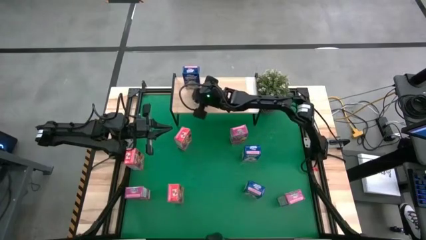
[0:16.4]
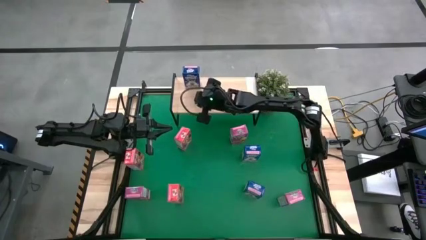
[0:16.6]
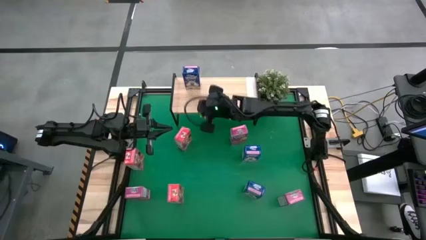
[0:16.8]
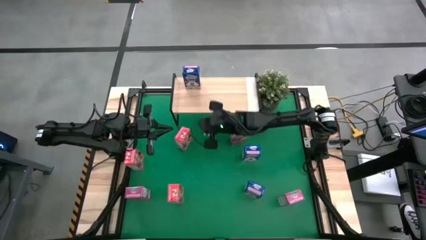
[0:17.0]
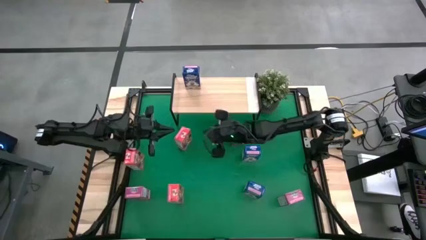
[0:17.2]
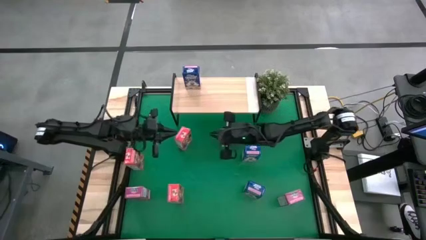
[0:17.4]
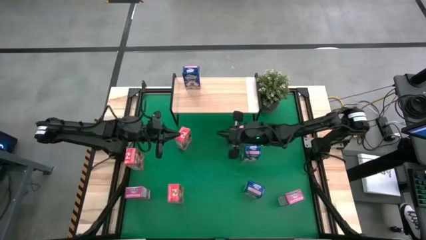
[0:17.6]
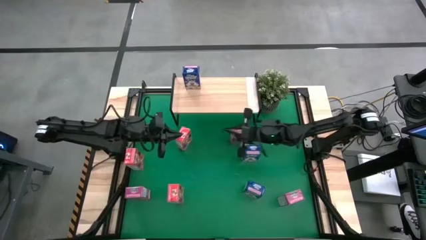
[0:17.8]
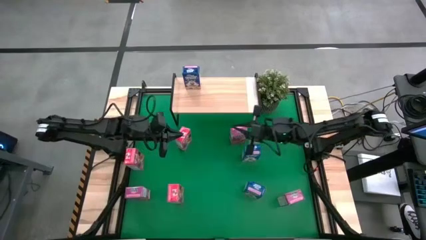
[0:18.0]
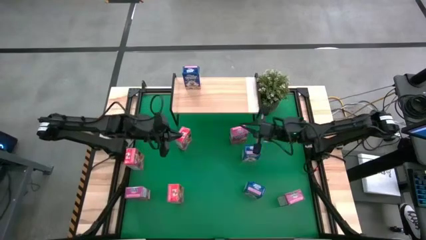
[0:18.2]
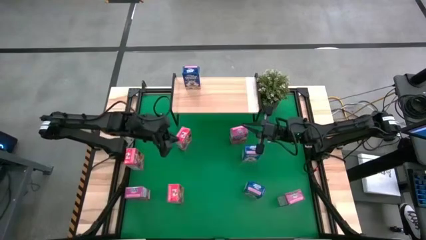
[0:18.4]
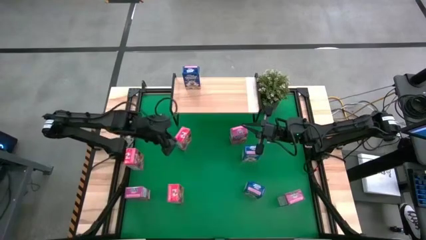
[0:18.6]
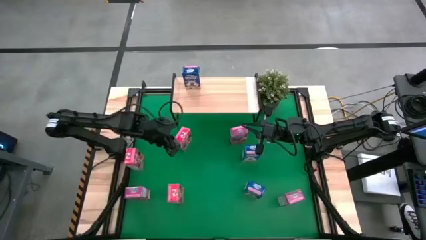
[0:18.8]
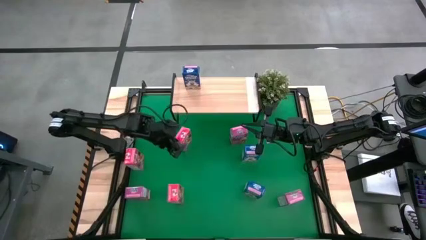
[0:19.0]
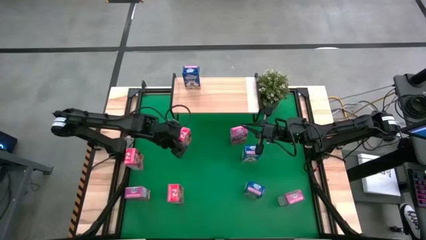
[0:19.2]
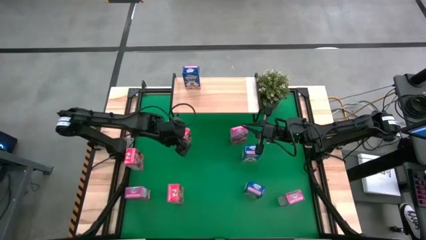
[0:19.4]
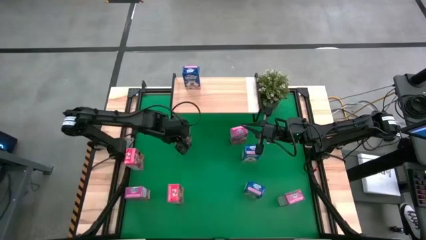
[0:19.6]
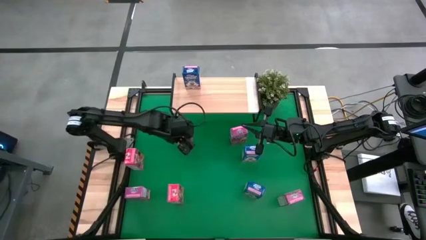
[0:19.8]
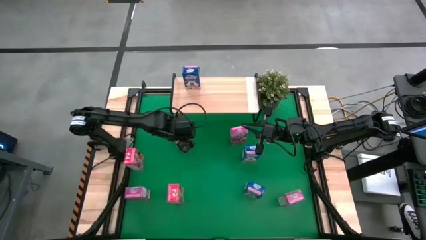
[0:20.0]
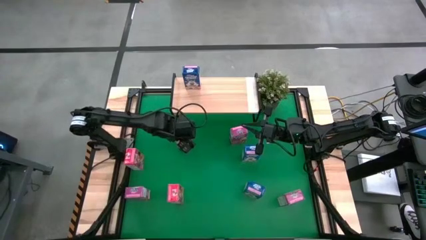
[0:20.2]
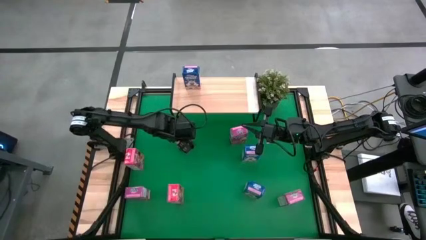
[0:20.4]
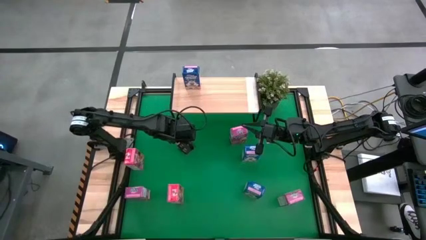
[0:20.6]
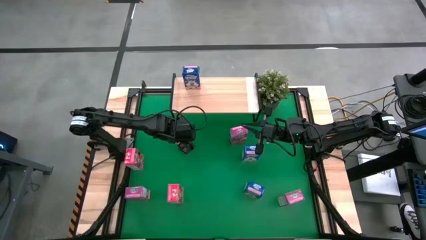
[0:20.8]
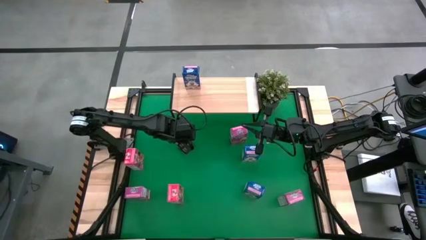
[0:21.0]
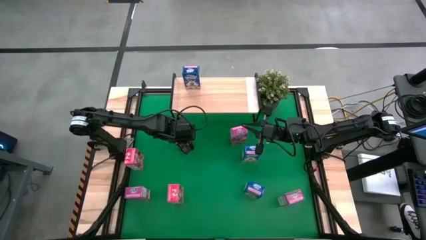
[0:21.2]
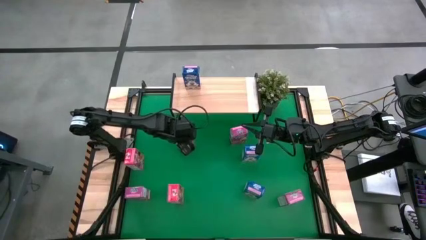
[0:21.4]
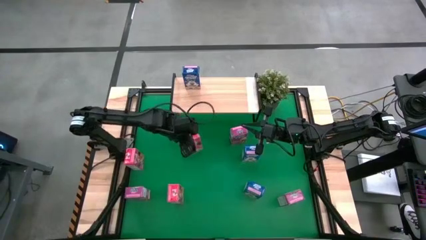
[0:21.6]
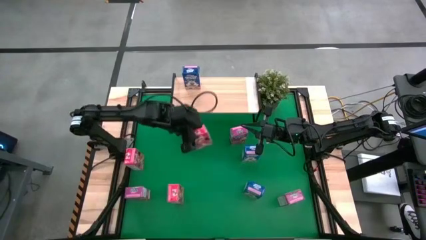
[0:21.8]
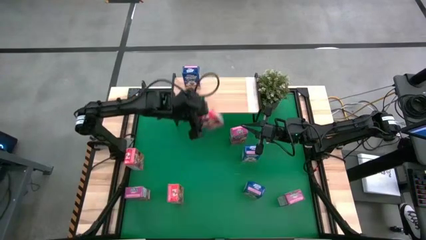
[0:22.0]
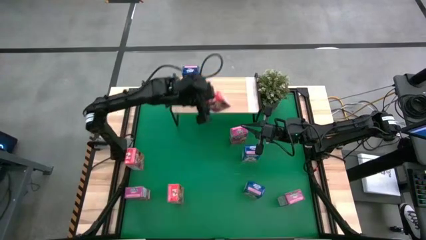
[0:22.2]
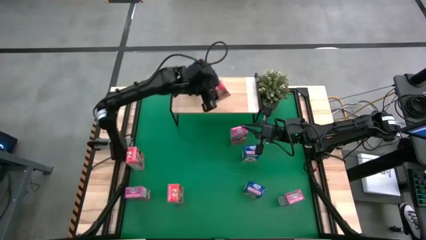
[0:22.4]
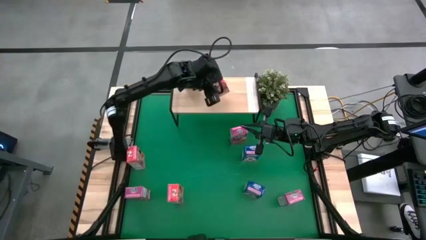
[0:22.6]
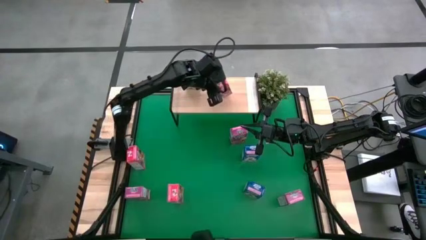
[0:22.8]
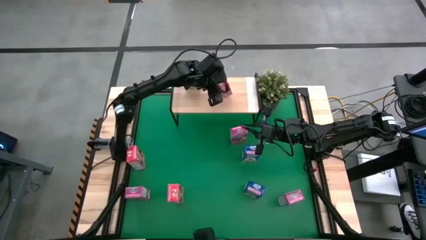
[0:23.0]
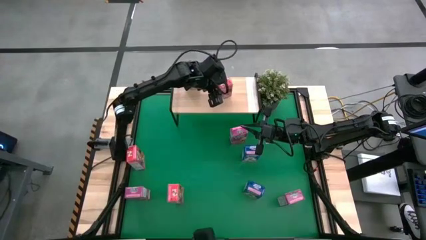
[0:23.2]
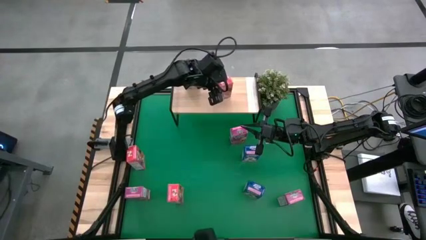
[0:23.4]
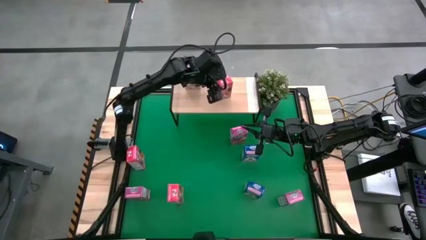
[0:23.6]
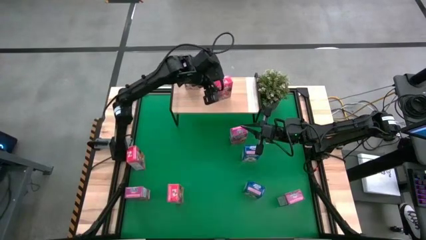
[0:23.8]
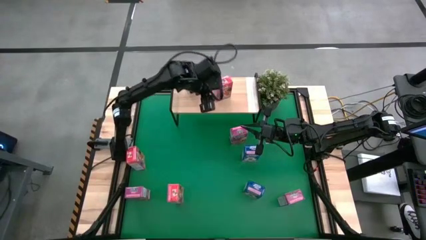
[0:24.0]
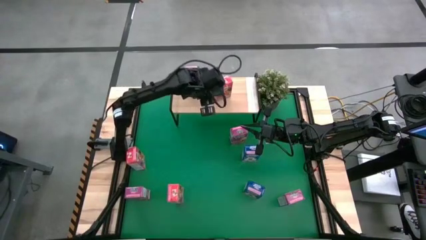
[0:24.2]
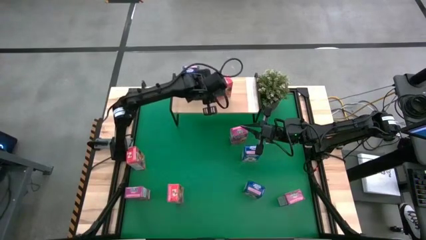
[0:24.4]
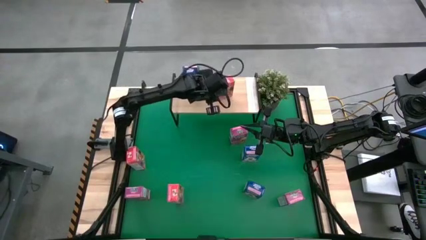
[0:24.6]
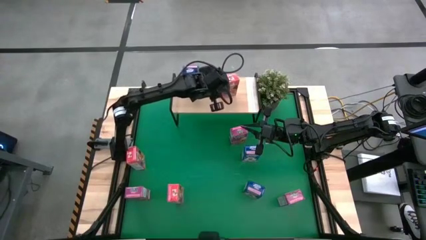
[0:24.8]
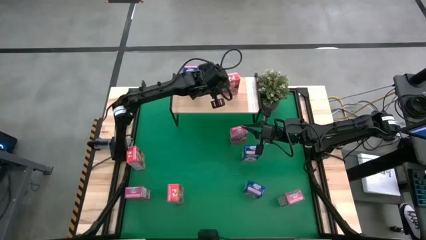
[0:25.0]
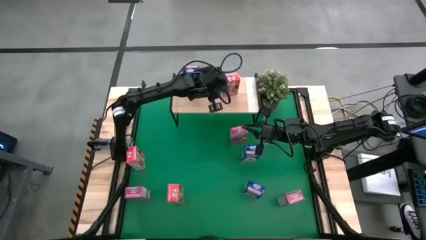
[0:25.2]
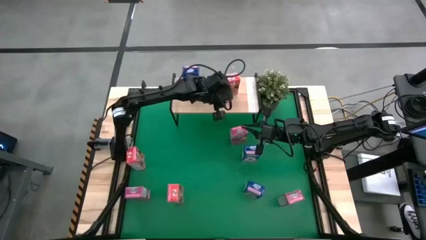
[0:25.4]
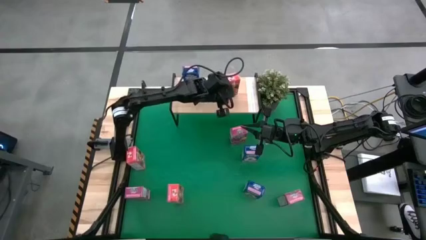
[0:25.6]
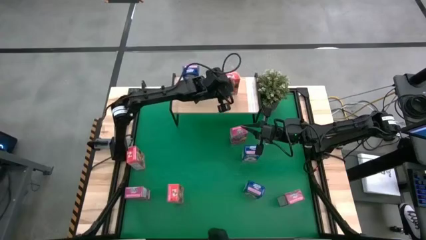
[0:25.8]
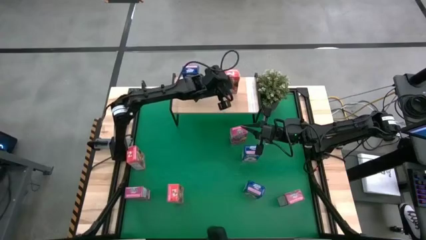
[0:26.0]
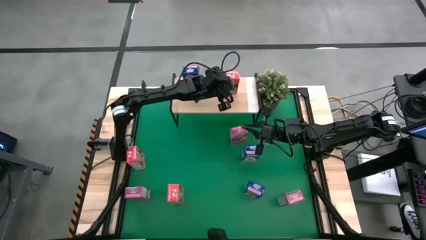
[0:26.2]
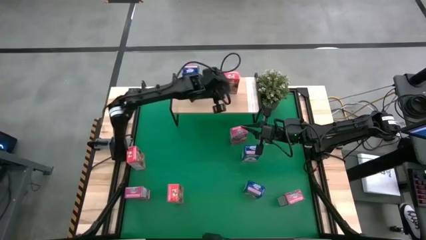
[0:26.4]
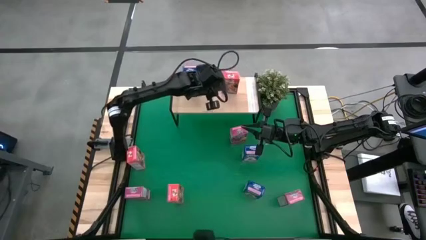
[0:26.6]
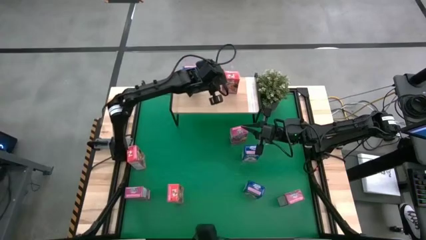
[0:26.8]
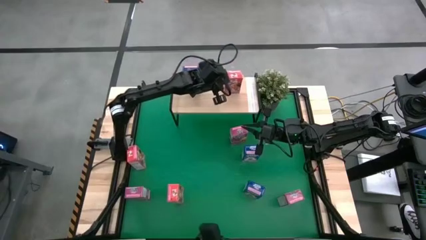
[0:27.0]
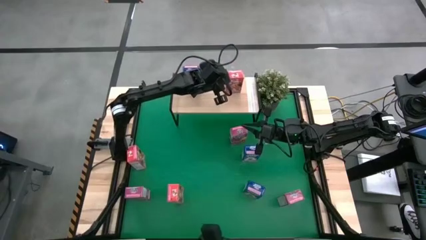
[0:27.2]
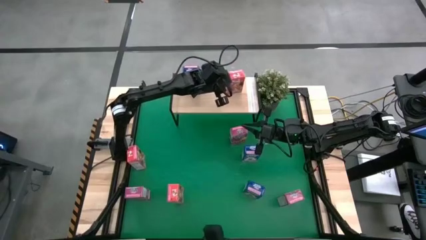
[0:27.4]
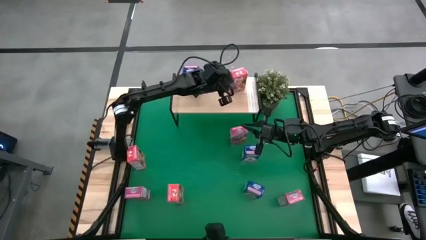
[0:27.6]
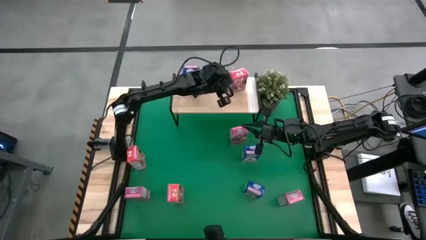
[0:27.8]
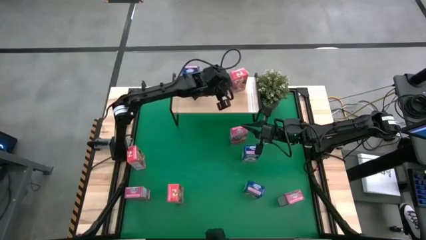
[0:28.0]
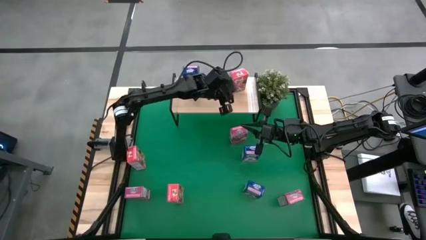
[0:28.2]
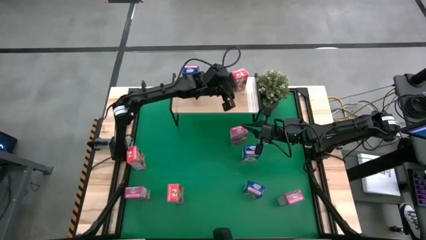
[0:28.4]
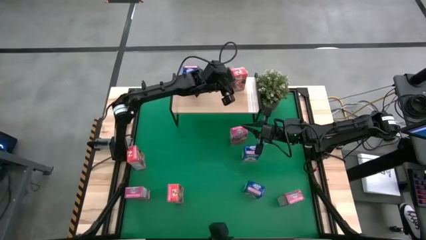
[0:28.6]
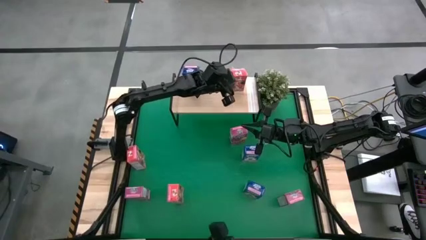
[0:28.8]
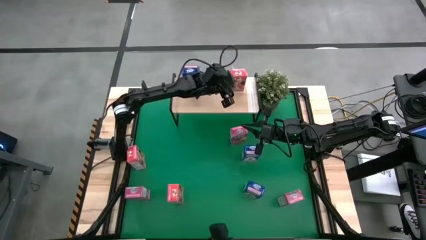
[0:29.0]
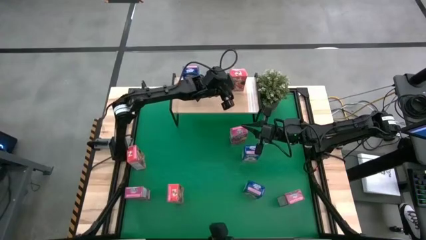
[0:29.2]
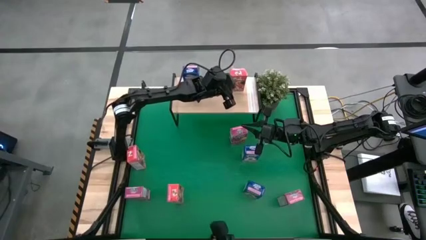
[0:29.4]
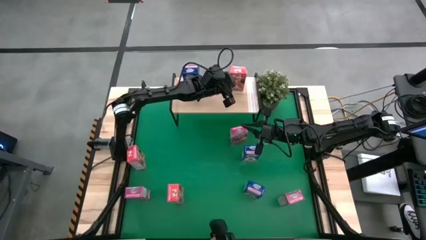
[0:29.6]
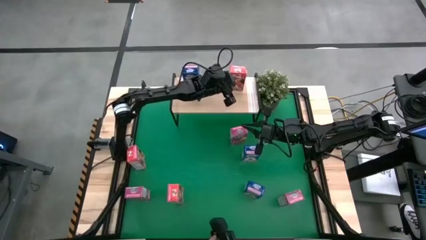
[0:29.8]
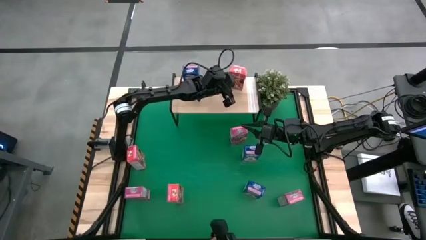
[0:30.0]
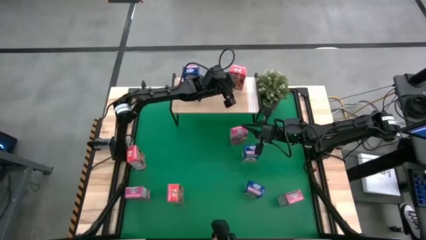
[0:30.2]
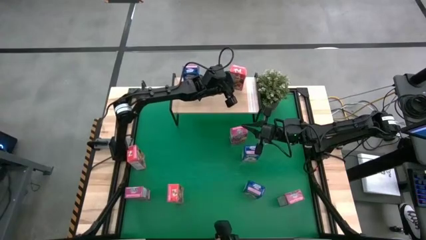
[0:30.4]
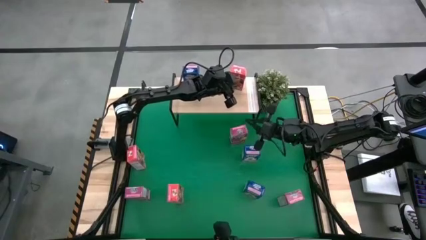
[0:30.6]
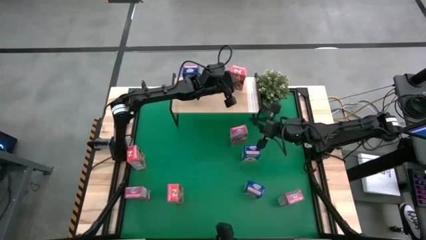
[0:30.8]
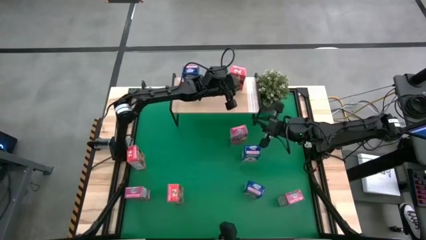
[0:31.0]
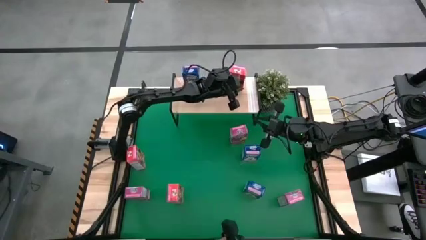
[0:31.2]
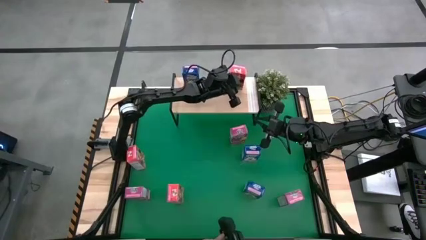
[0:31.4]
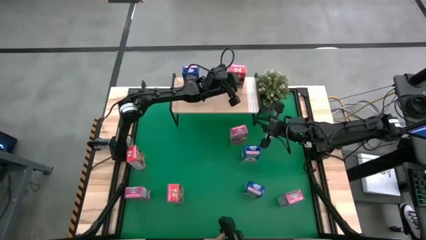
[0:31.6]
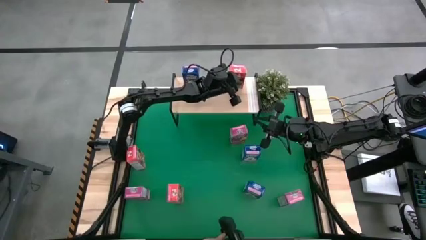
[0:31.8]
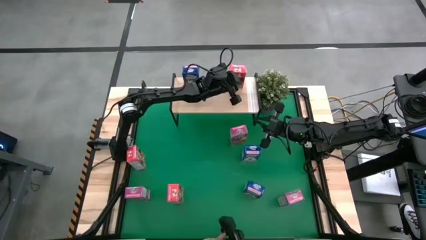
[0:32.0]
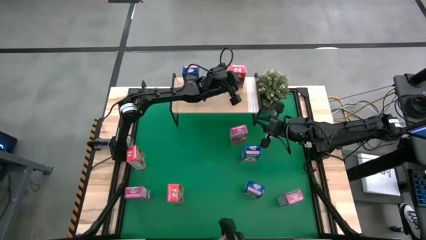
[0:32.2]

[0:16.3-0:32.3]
Task: Stack cereal on shelf
Put the top red cereal box on the shelf
